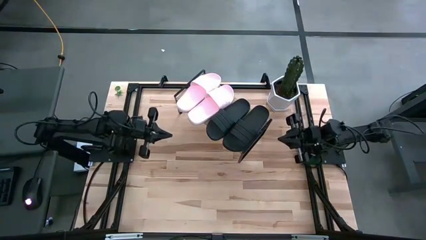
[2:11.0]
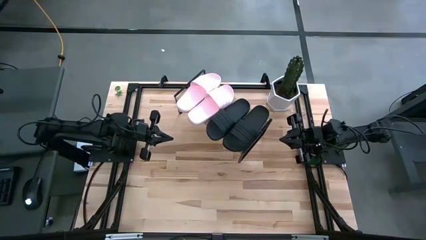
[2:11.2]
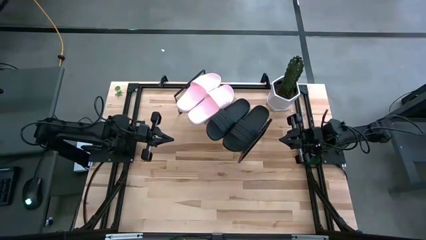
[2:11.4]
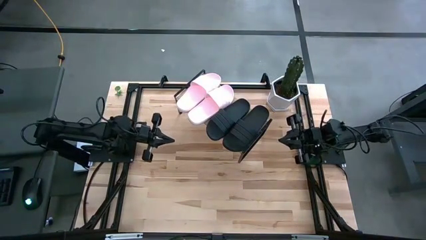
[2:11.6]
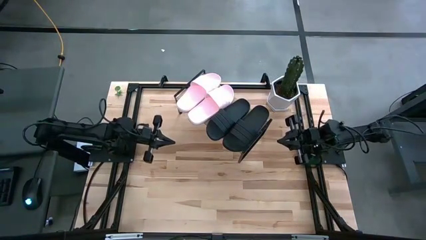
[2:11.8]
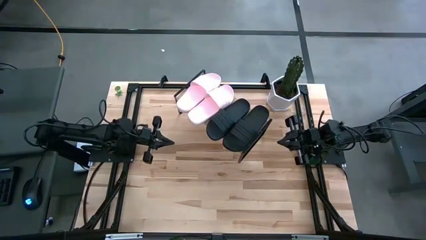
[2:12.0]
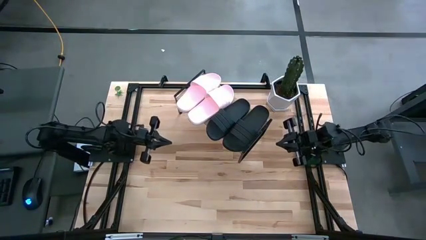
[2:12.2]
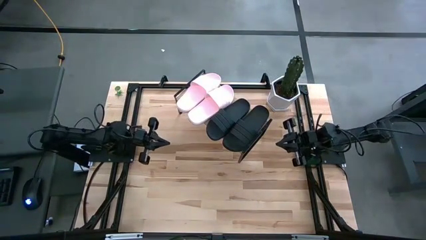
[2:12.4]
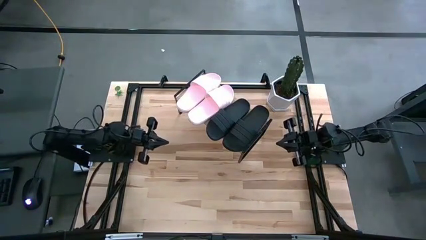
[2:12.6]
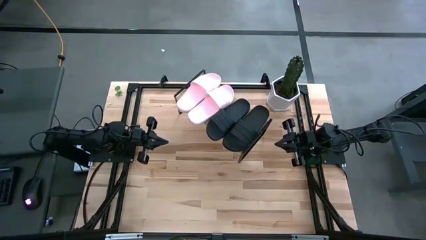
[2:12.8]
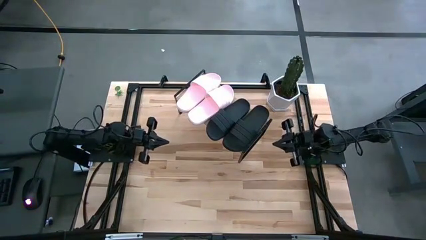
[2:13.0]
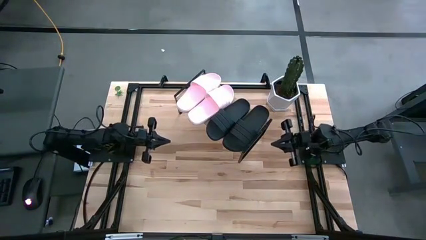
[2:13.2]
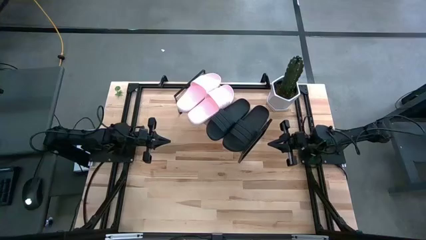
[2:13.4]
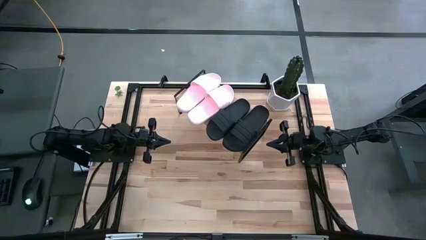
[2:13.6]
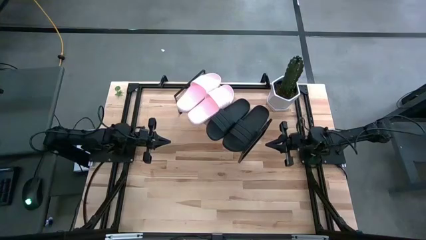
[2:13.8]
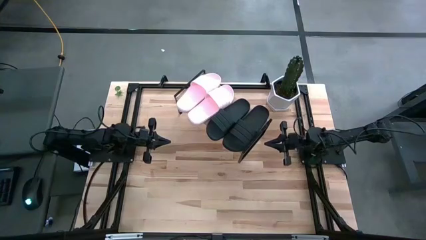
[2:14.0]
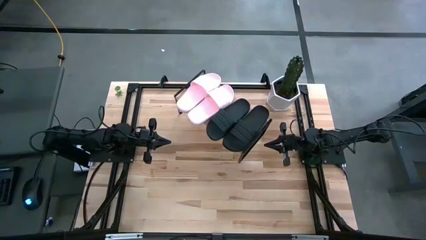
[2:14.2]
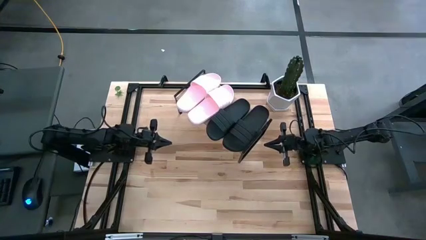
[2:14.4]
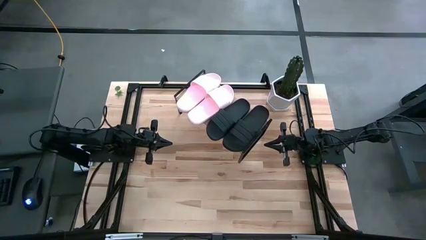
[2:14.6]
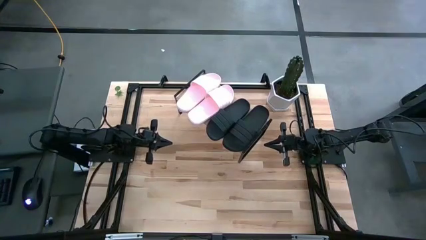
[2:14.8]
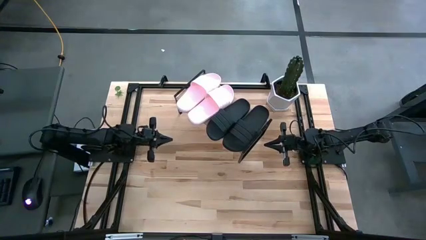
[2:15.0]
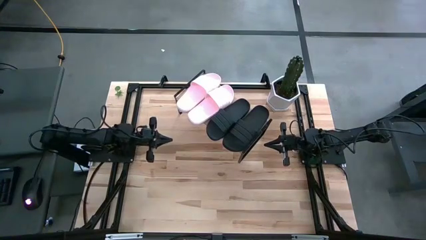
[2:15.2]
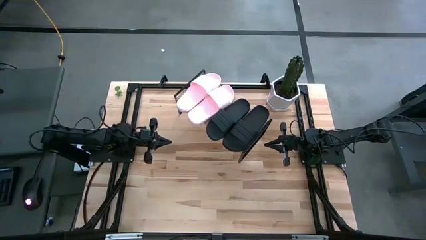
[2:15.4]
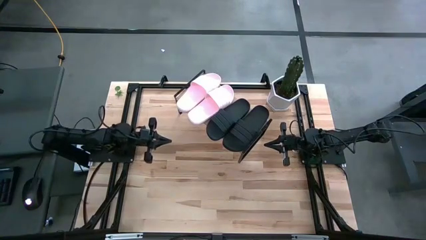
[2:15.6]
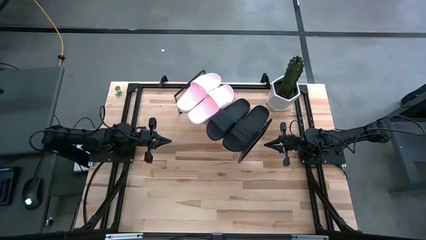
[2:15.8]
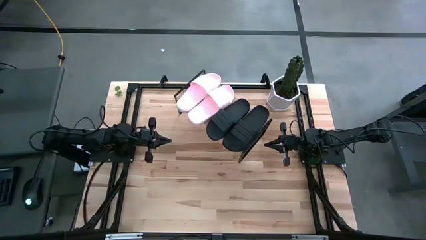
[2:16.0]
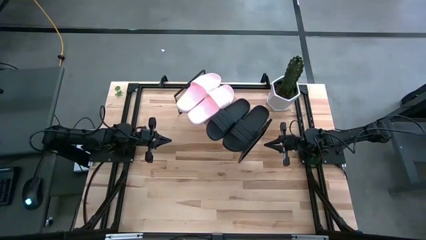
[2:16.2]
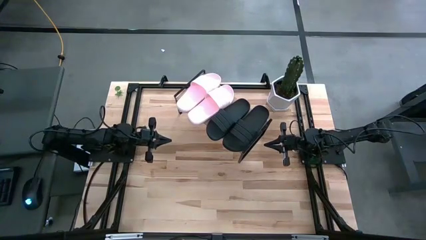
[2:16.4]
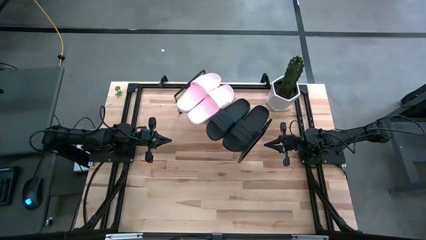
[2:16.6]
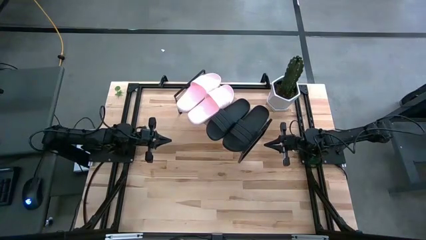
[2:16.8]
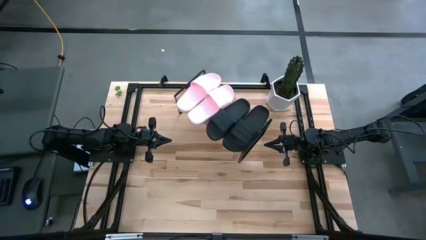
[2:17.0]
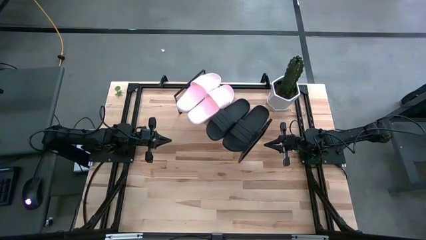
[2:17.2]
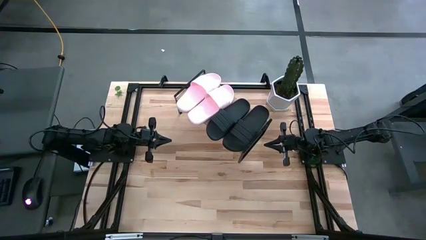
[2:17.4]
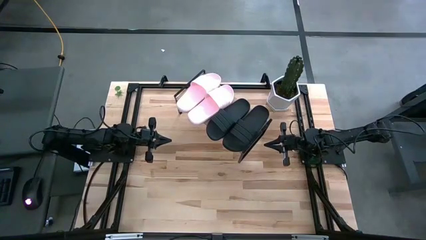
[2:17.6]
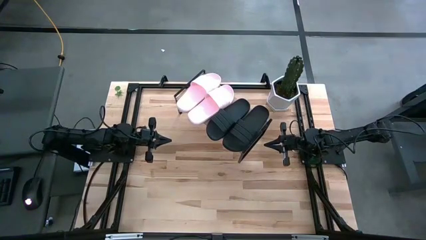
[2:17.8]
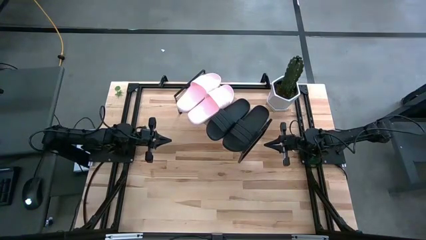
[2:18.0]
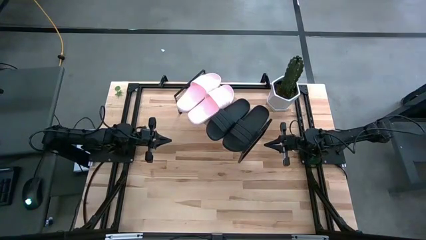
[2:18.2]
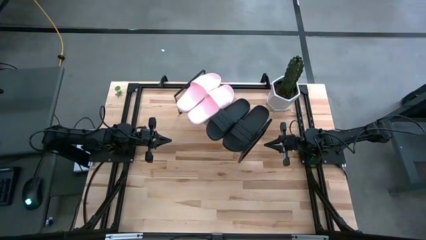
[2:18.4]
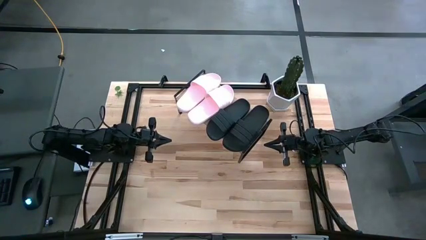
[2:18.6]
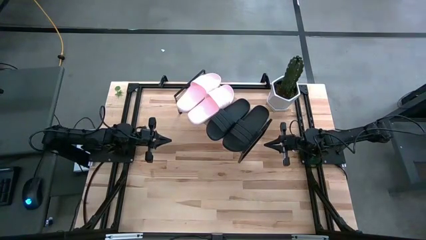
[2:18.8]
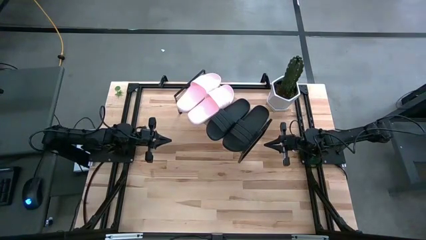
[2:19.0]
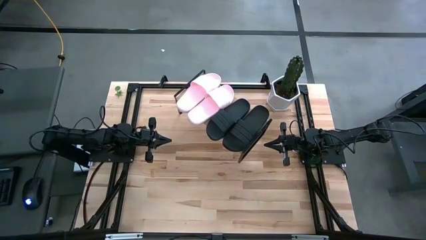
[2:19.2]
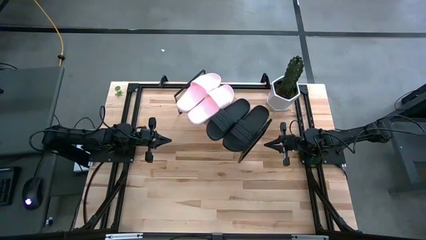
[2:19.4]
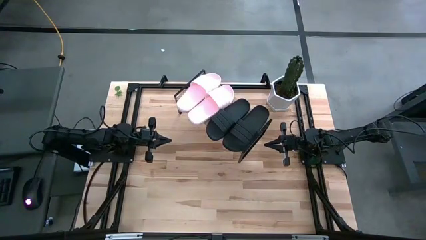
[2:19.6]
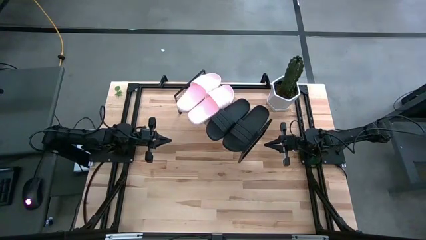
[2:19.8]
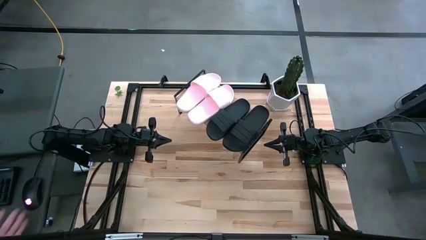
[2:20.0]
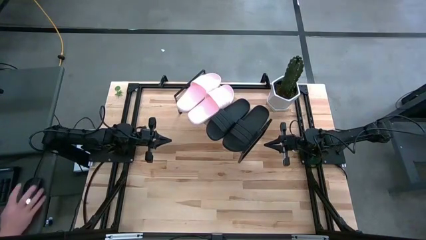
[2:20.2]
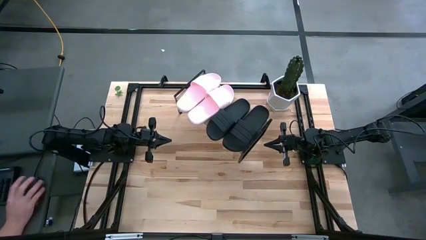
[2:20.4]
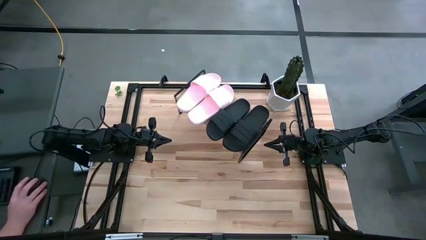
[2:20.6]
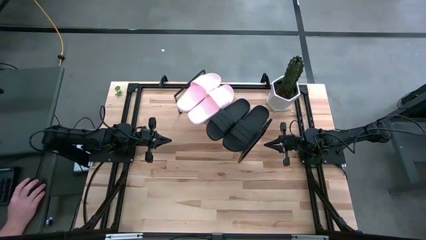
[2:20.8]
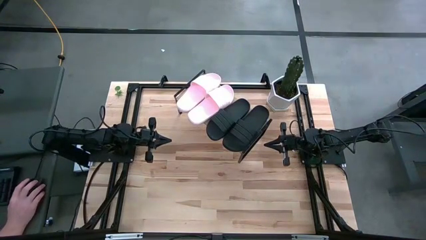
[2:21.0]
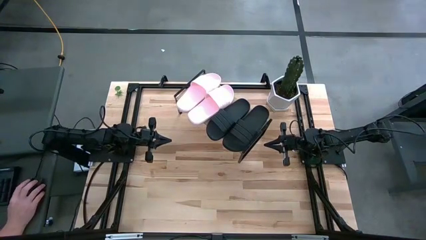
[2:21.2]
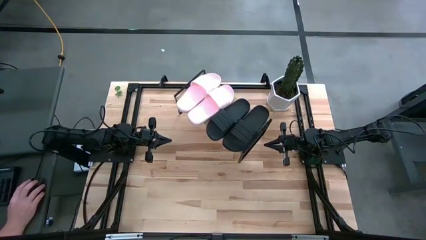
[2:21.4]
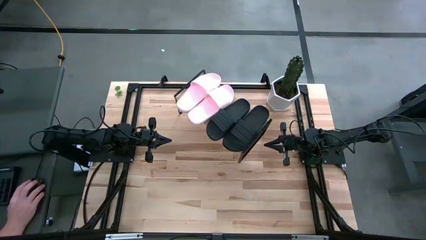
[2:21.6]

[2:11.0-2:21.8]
Task: Pick and place slides into the shelf
Return to Home Position

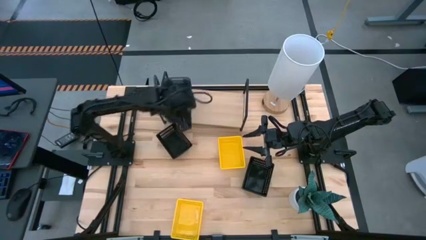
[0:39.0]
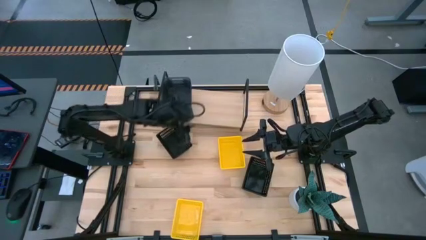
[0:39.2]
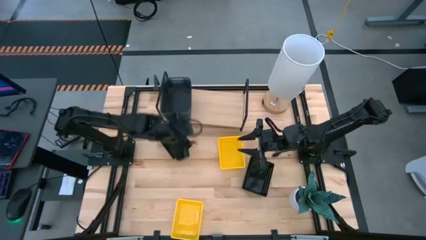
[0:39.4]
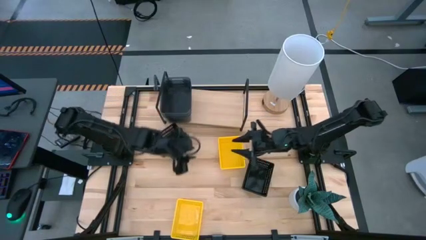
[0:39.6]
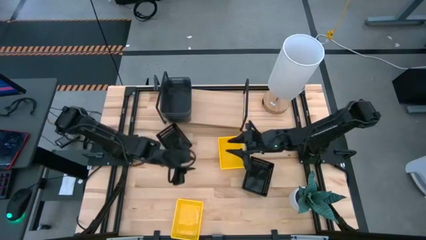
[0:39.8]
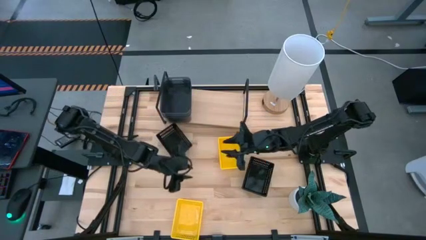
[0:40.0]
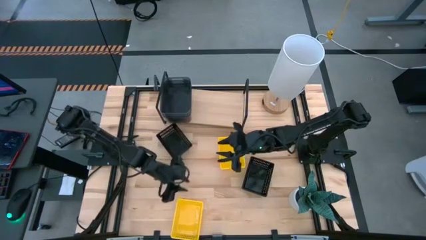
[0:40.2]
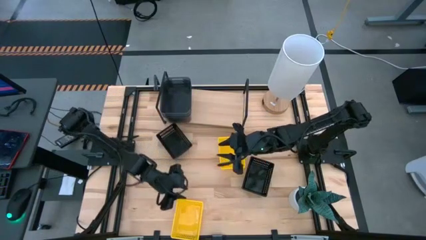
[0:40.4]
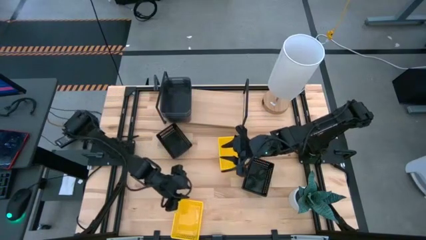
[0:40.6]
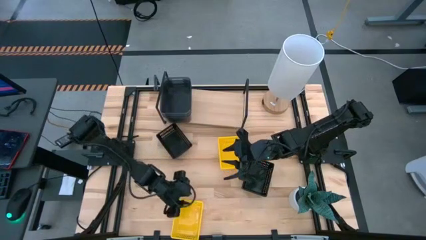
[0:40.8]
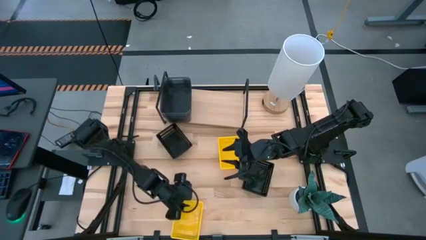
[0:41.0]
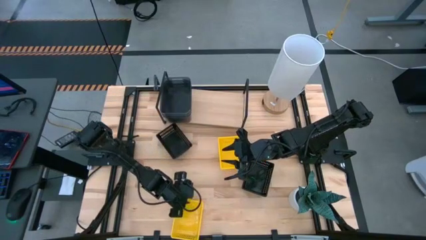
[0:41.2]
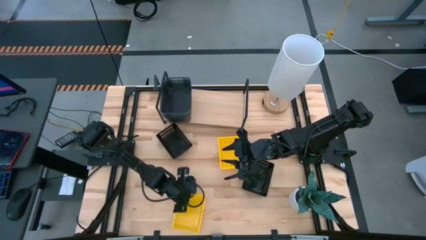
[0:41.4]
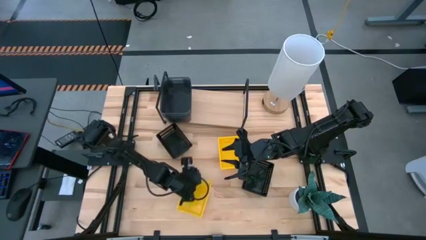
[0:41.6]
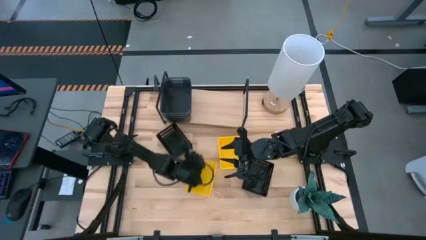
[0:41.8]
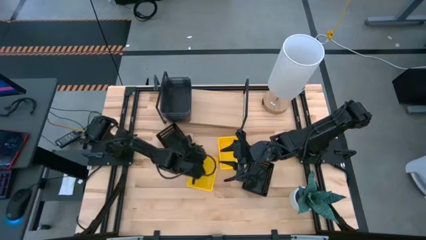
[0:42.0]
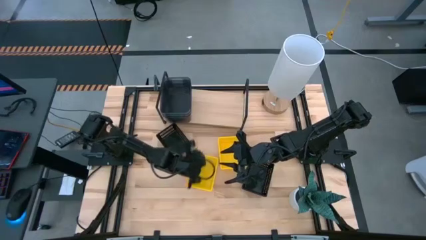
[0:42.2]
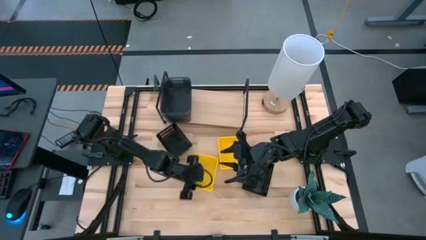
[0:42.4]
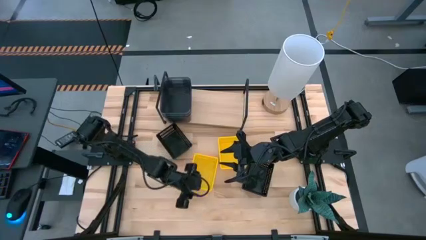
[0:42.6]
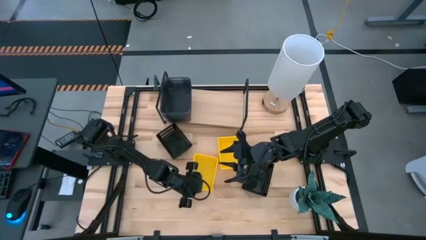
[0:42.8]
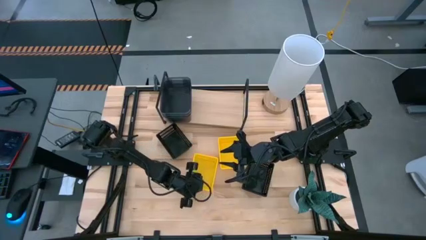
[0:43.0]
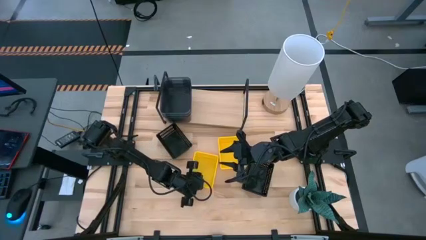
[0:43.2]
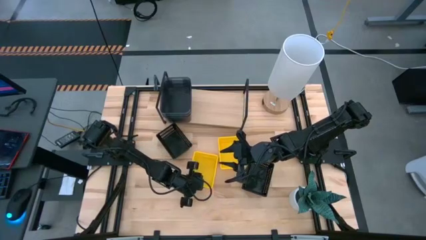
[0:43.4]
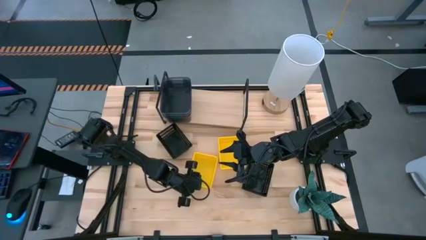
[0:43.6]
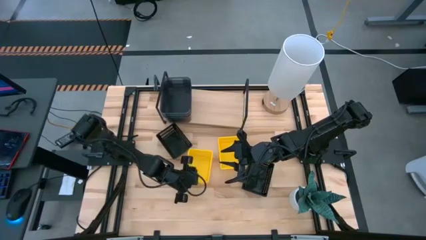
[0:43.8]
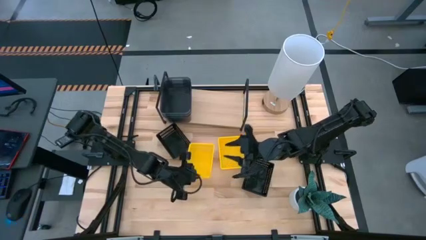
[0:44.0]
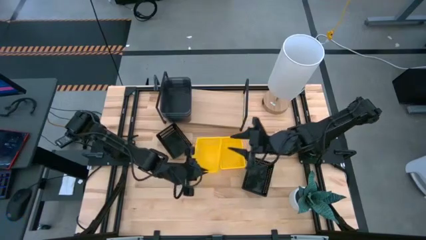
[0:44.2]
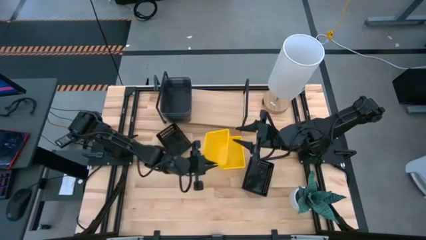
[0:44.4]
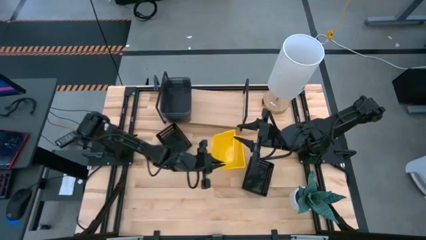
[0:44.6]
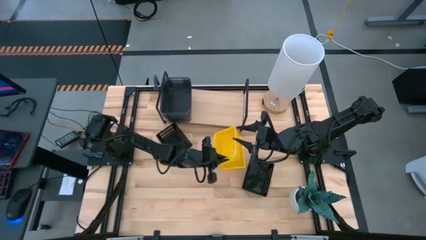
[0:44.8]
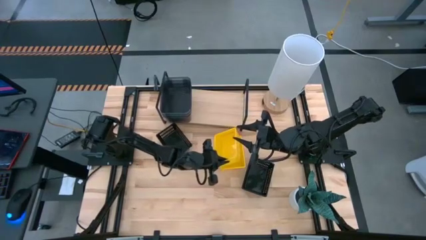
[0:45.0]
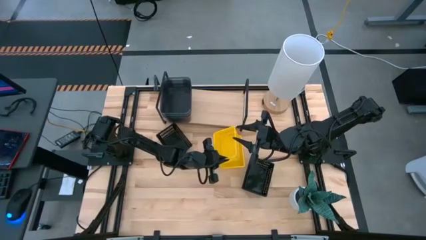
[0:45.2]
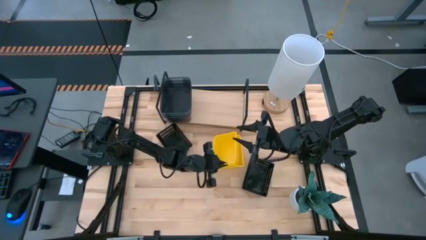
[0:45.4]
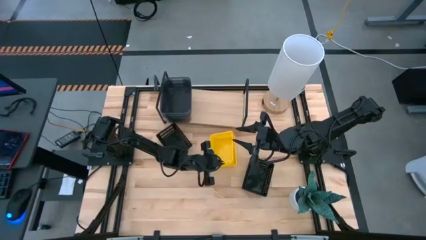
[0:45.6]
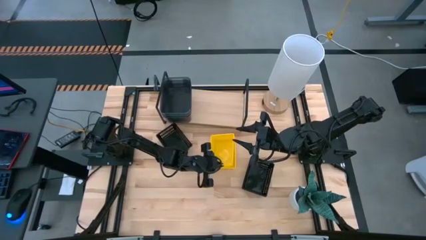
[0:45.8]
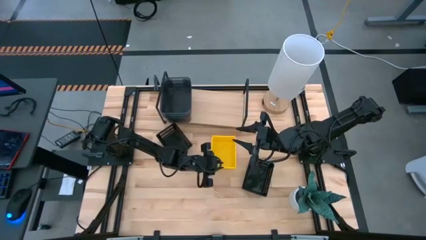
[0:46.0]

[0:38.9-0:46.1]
Task: Stack baskets on shelf by color
Stack the bottom yellow bin on top of the top yellow bin
